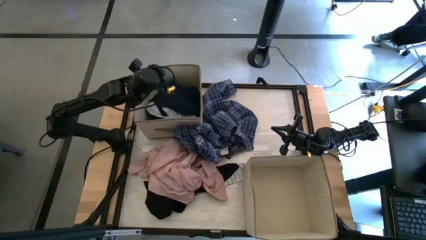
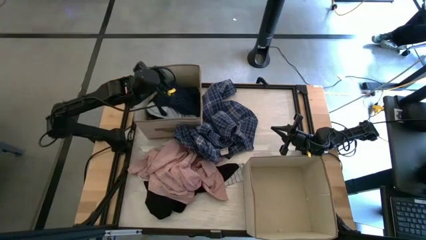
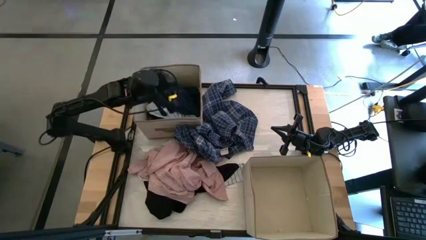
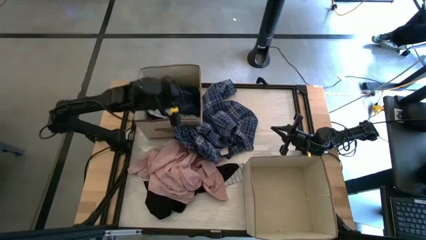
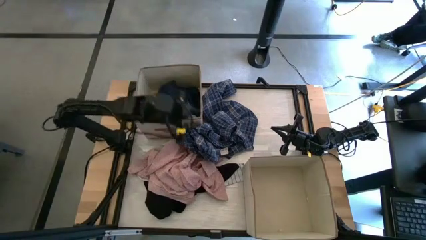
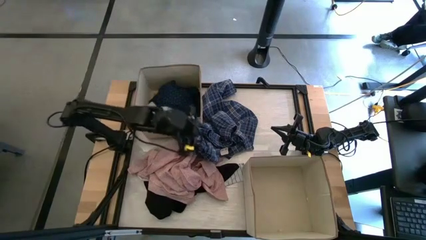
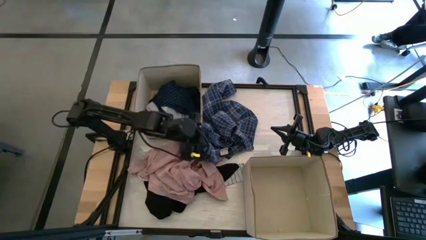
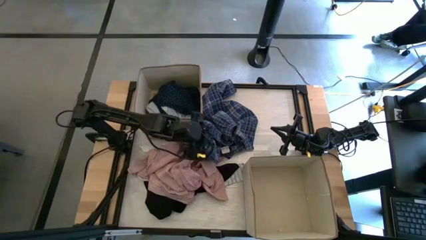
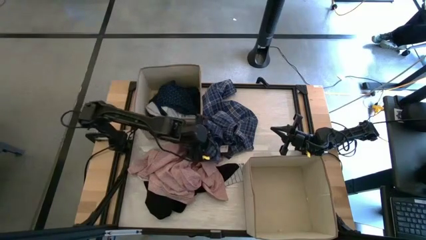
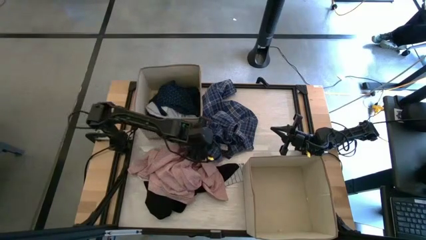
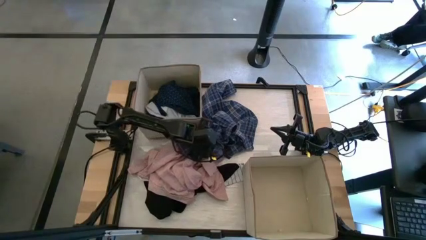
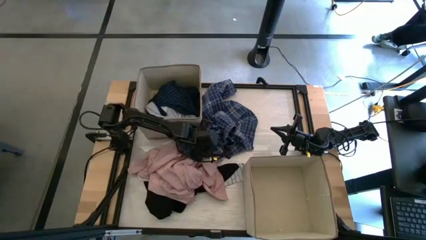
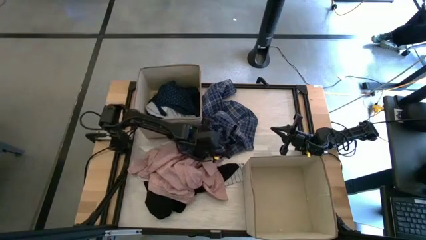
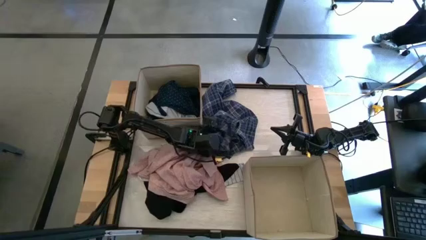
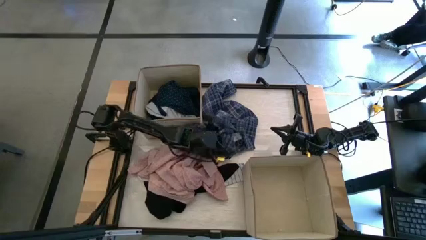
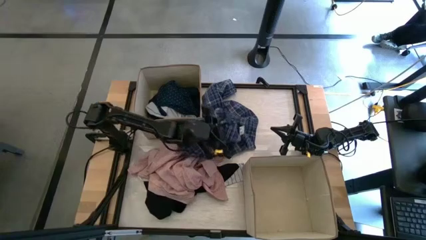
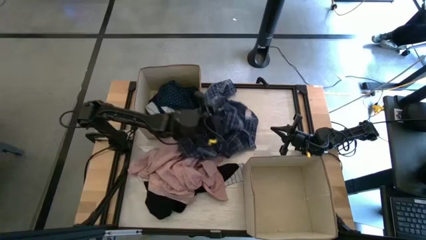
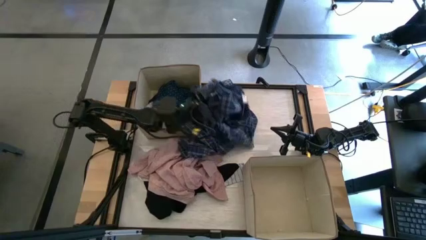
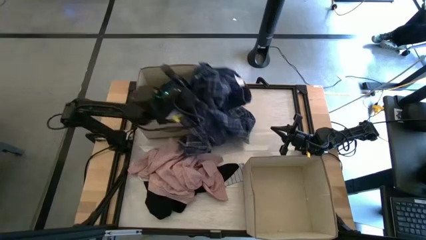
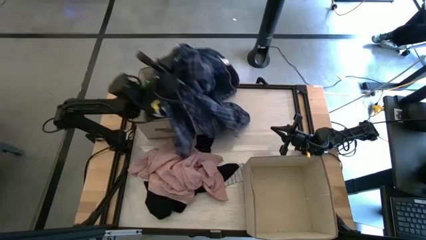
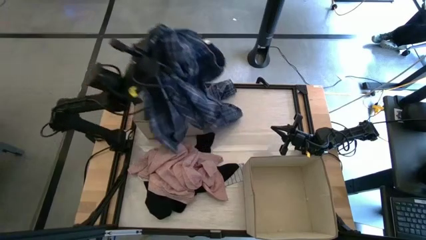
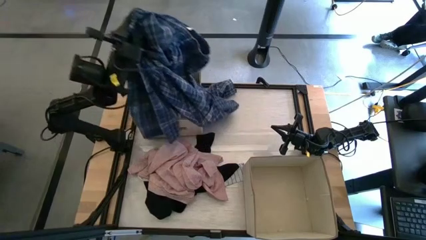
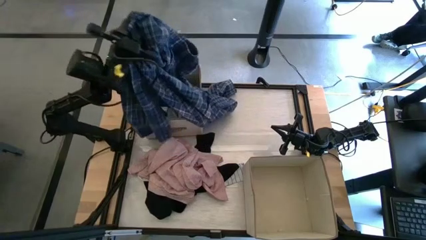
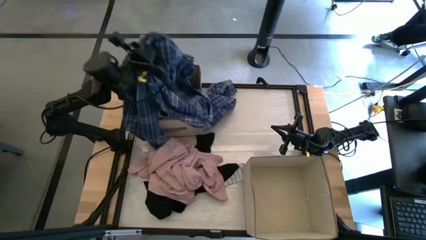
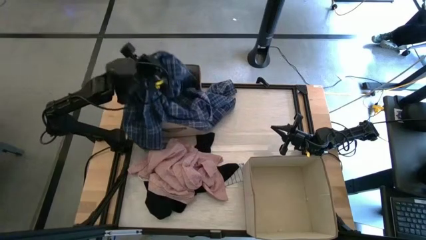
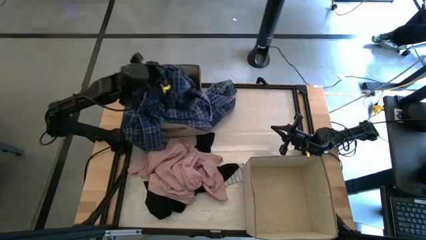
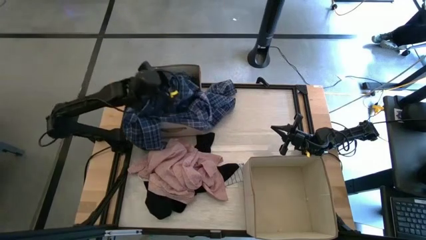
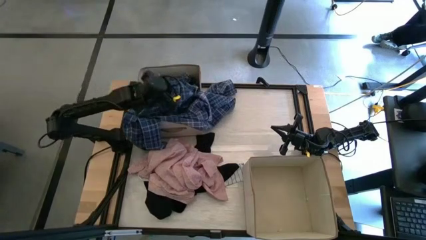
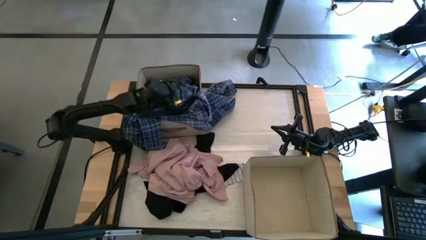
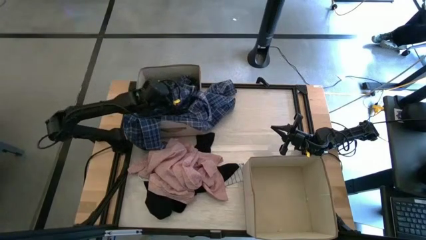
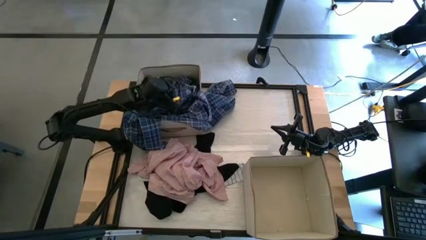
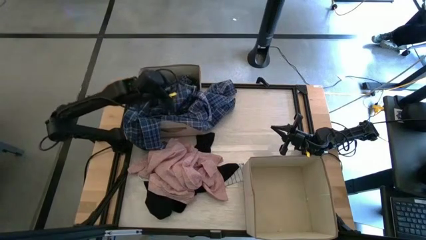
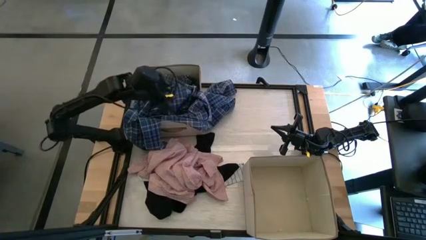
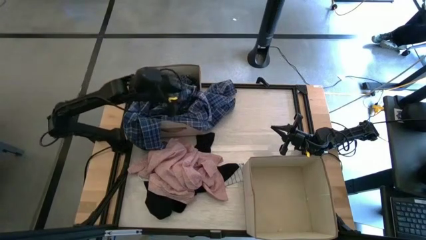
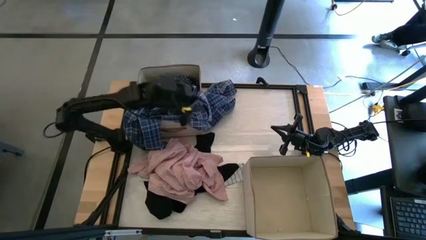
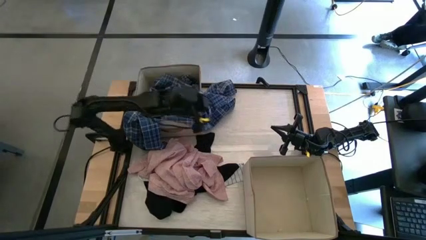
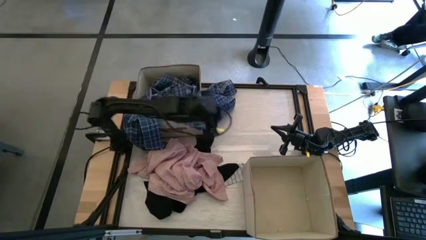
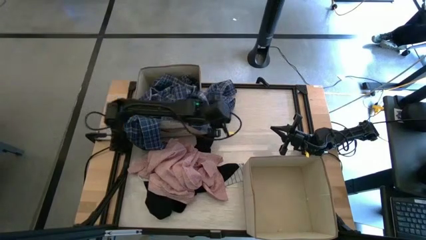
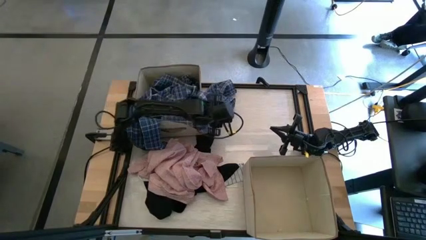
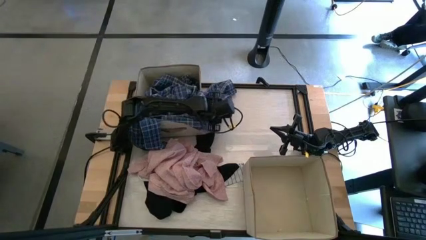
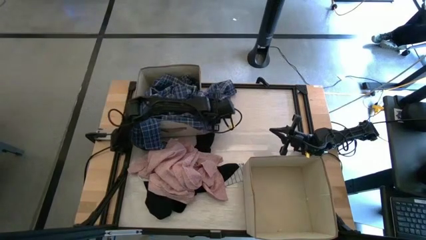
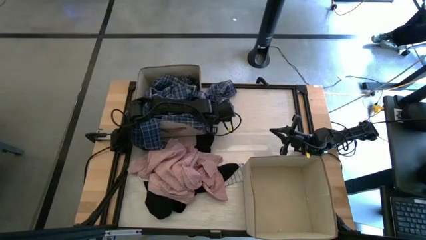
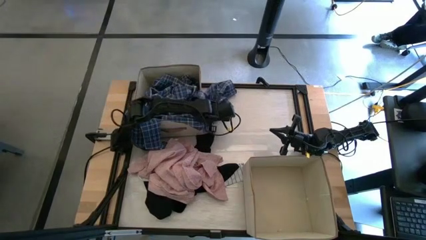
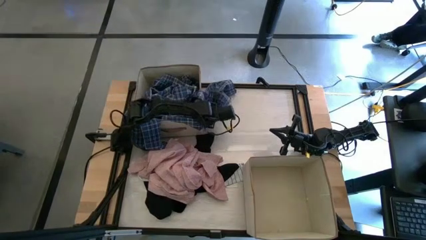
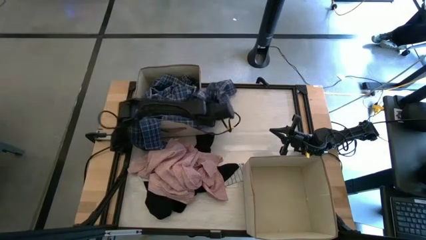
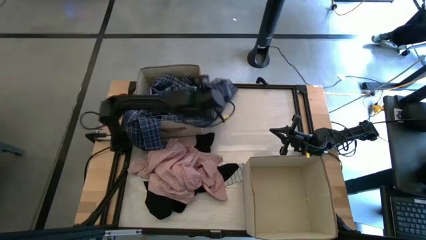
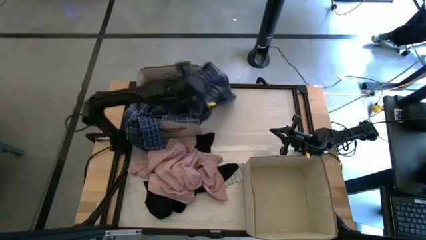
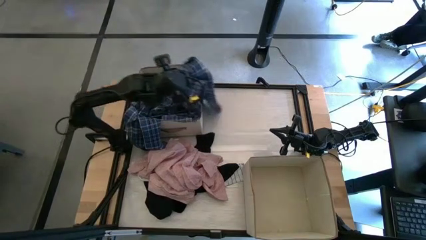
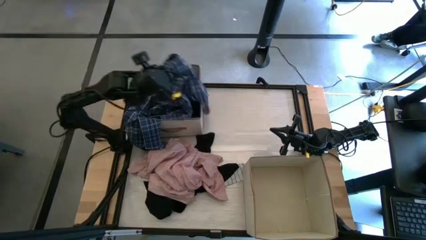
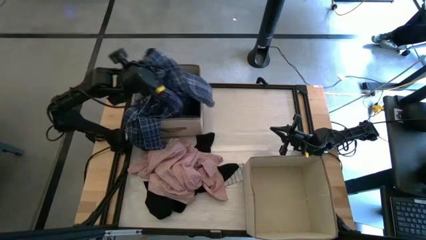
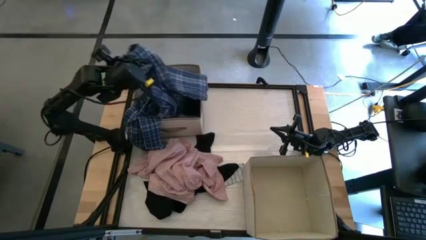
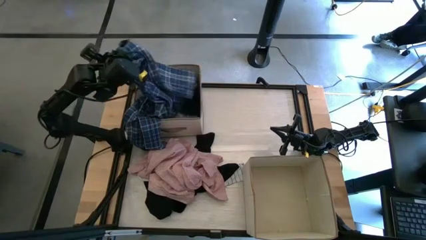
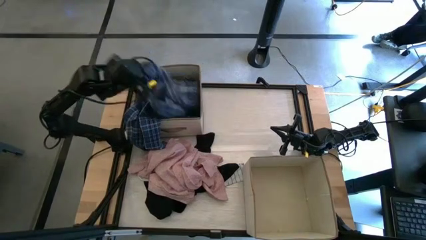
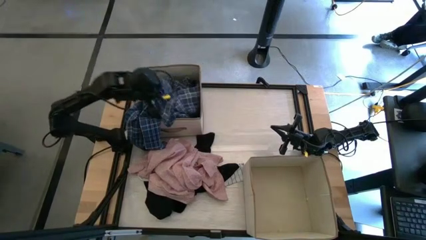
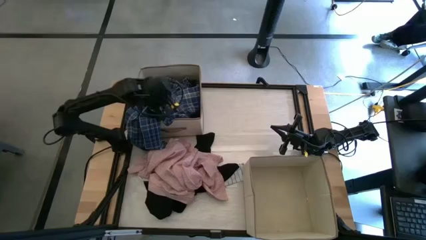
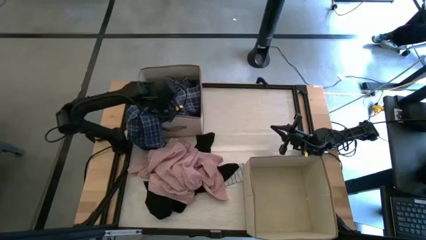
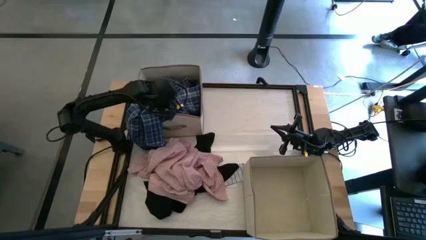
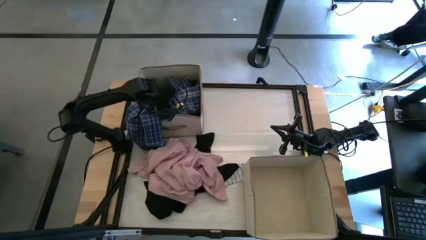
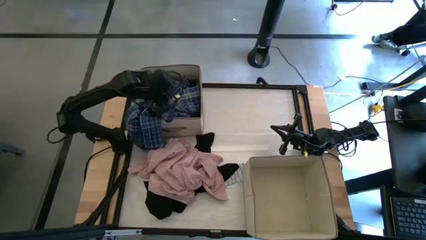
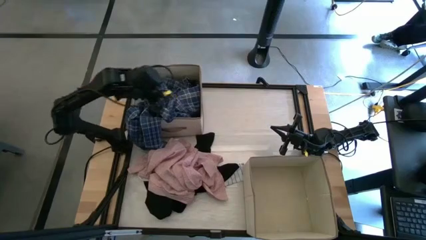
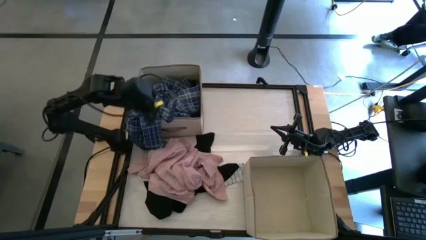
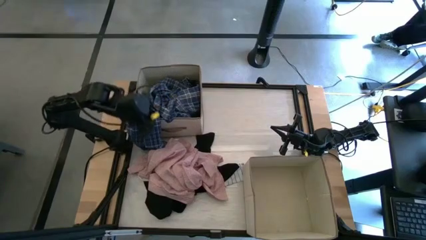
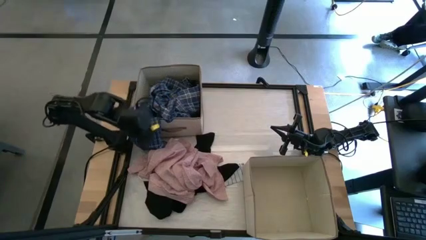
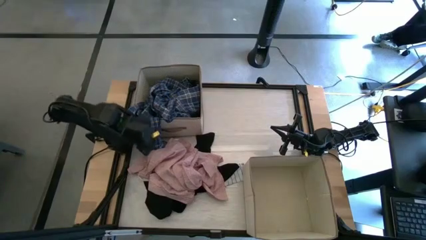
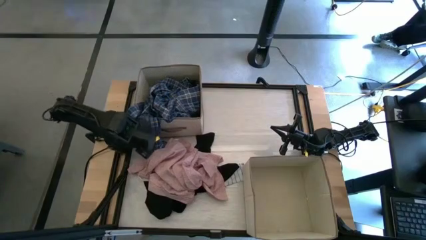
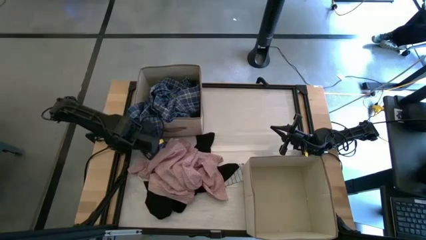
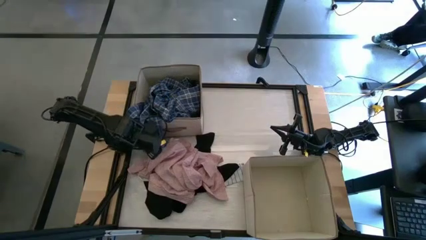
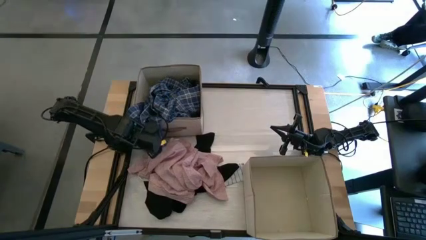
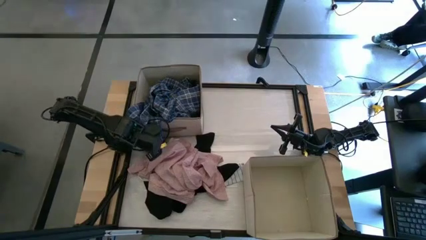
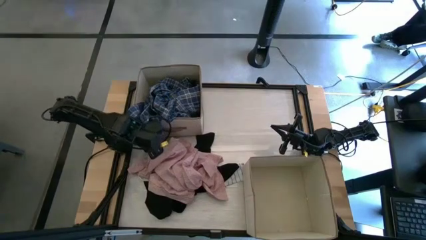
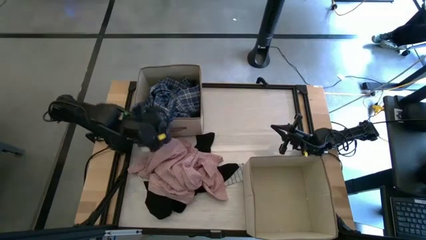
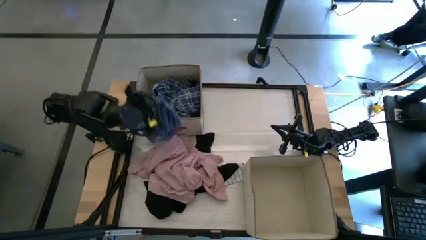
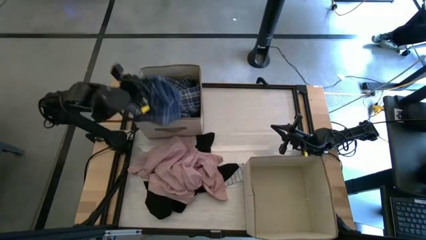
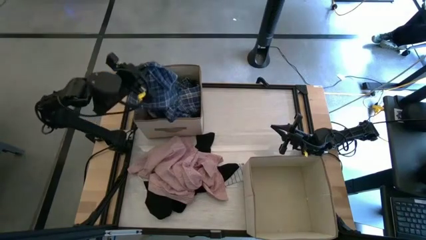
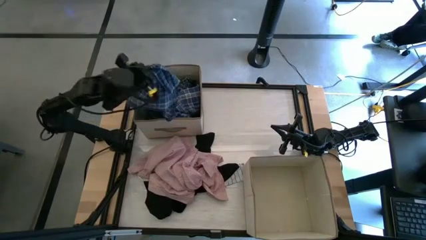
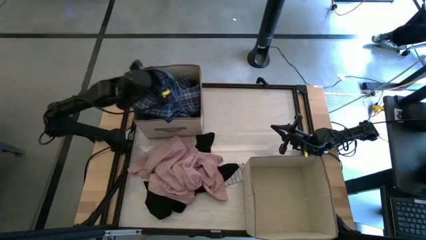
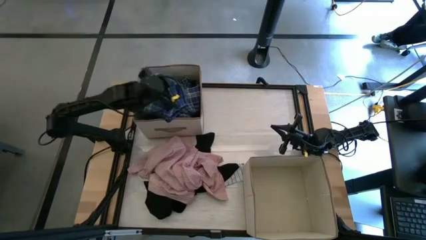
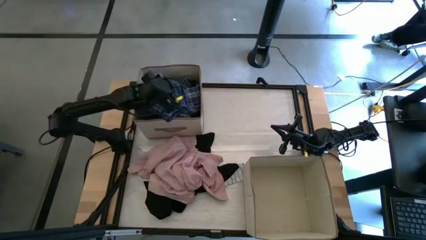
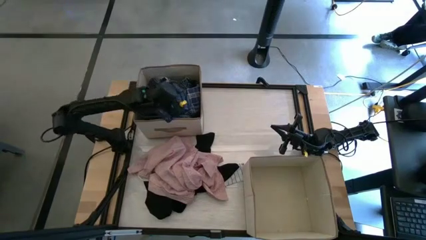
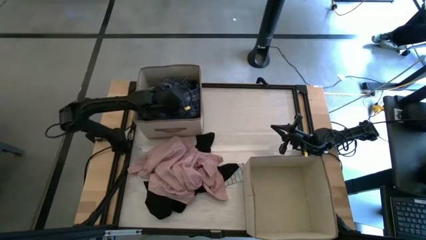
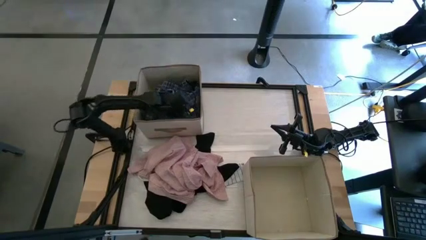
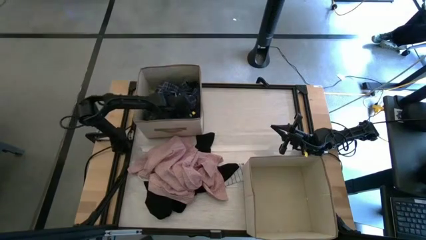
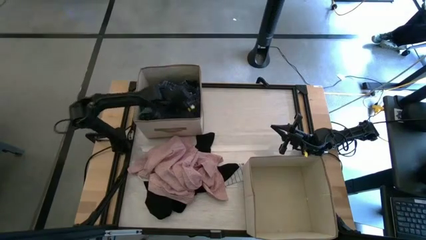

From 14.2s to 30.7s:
Task: Sort clothes
Put the blue pajamas into the top white laundry organizer
